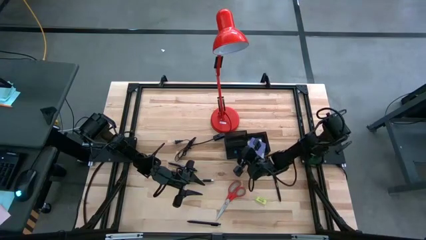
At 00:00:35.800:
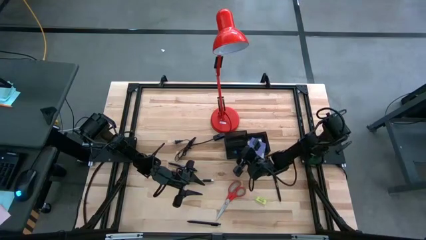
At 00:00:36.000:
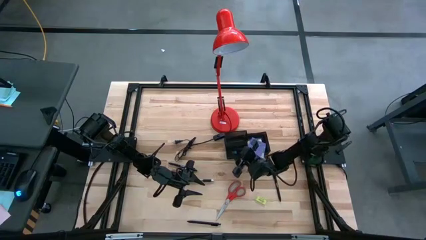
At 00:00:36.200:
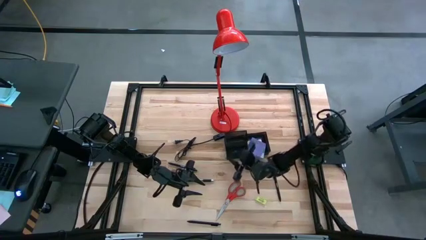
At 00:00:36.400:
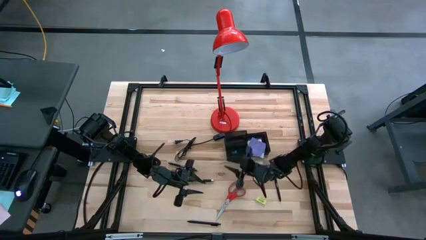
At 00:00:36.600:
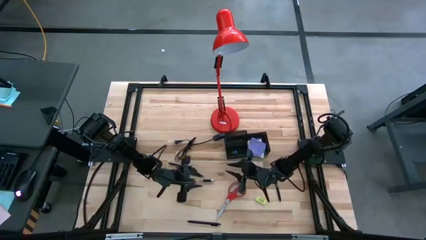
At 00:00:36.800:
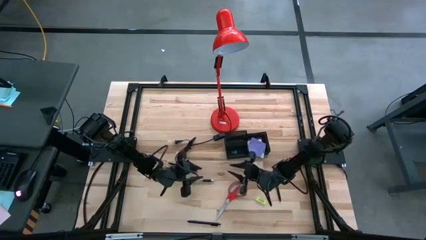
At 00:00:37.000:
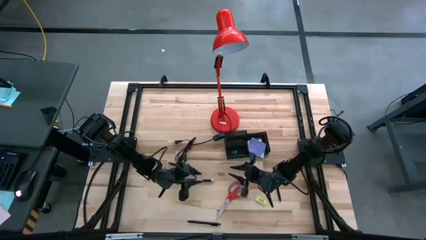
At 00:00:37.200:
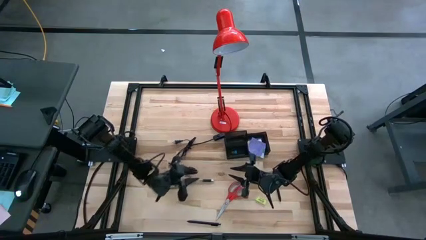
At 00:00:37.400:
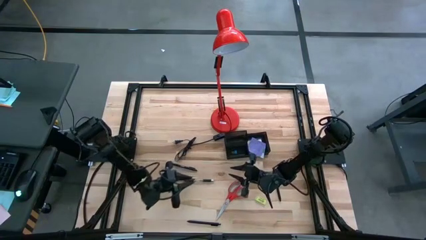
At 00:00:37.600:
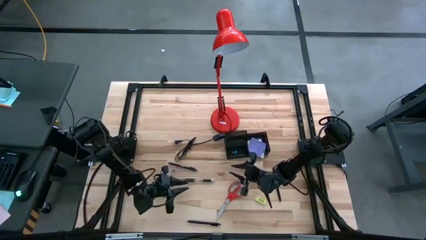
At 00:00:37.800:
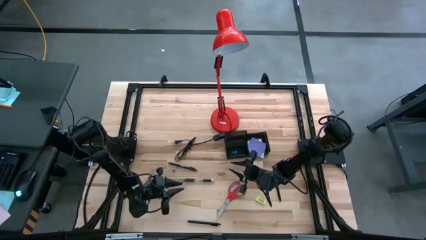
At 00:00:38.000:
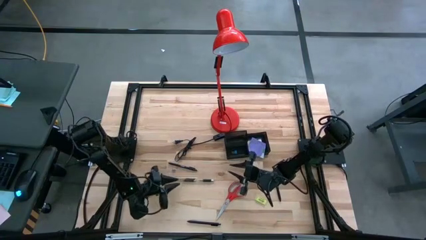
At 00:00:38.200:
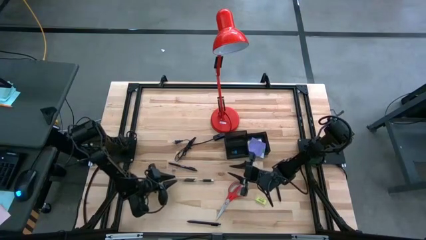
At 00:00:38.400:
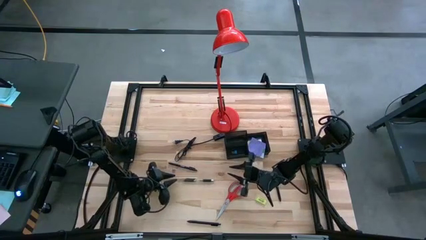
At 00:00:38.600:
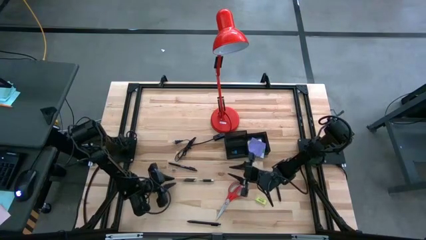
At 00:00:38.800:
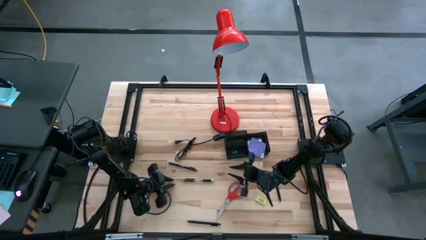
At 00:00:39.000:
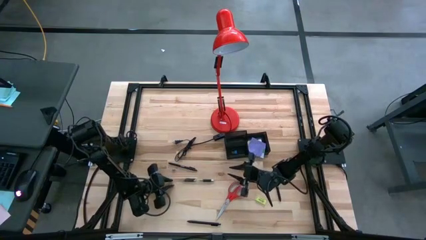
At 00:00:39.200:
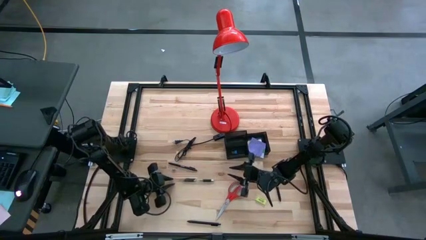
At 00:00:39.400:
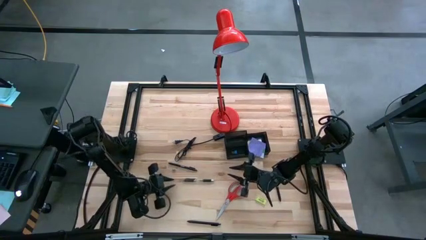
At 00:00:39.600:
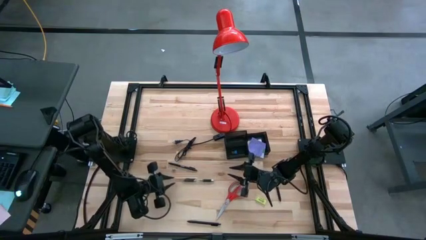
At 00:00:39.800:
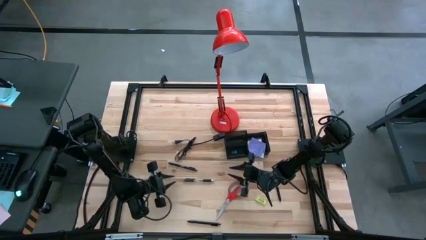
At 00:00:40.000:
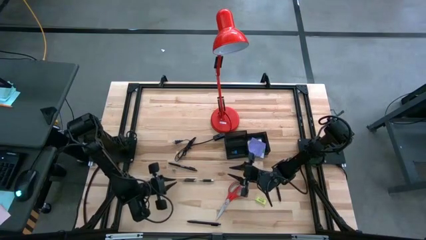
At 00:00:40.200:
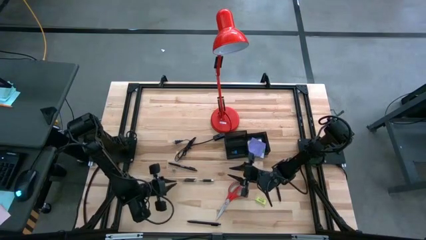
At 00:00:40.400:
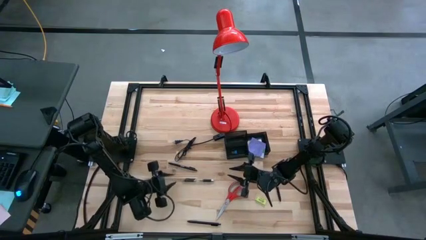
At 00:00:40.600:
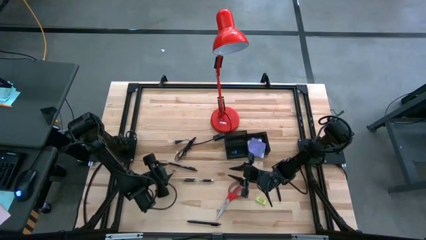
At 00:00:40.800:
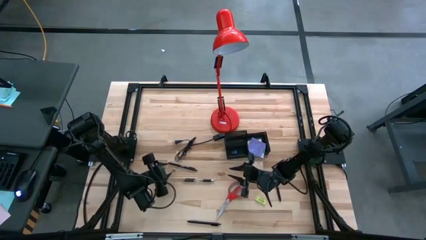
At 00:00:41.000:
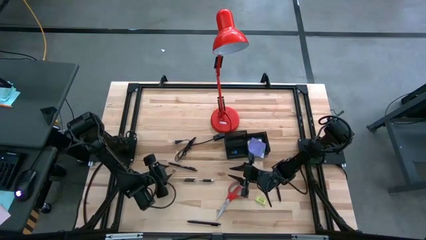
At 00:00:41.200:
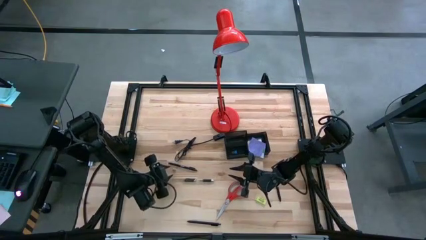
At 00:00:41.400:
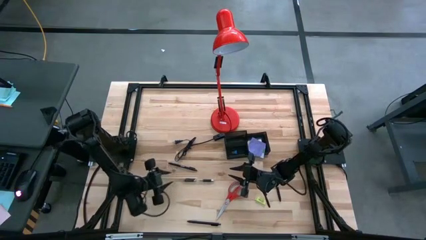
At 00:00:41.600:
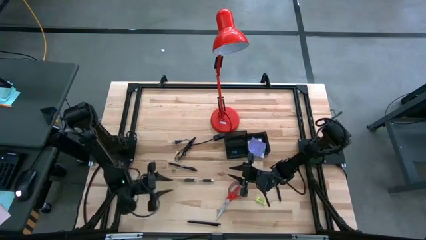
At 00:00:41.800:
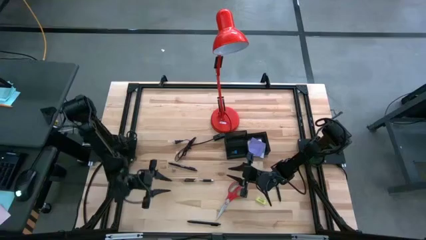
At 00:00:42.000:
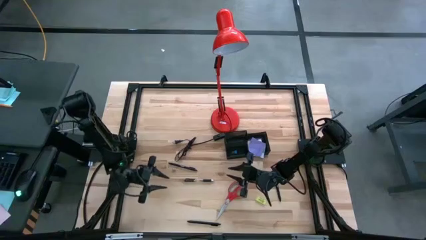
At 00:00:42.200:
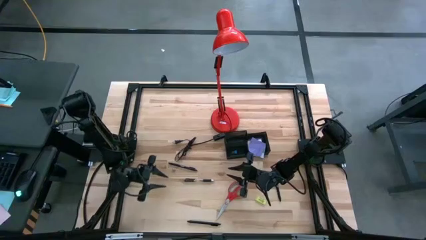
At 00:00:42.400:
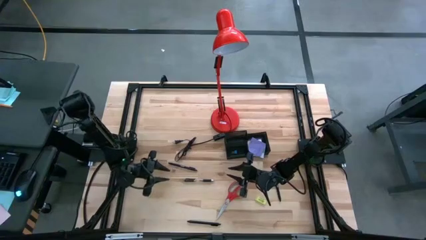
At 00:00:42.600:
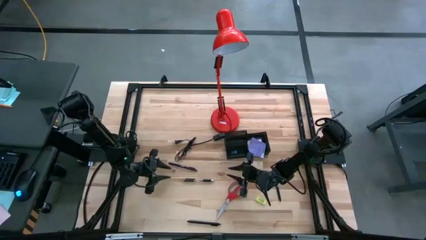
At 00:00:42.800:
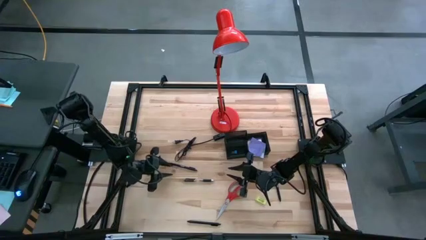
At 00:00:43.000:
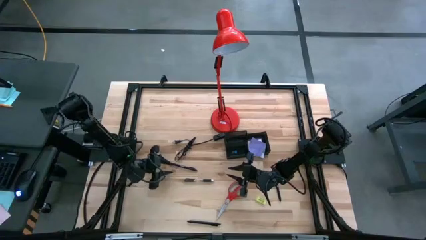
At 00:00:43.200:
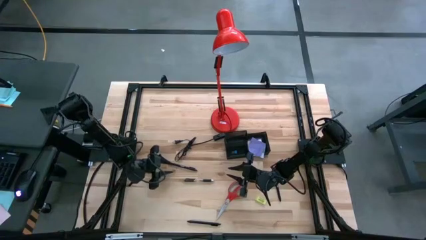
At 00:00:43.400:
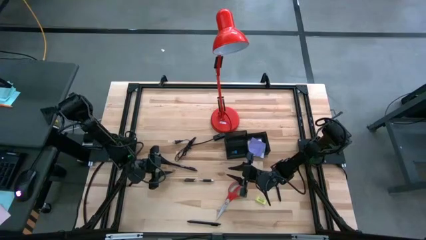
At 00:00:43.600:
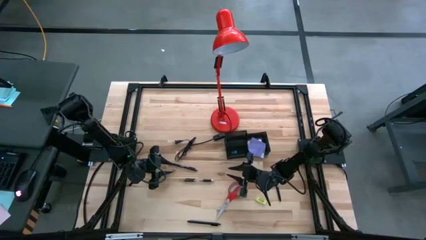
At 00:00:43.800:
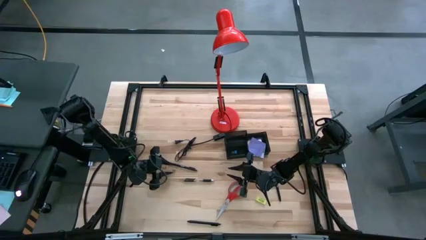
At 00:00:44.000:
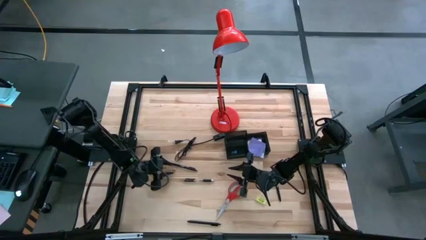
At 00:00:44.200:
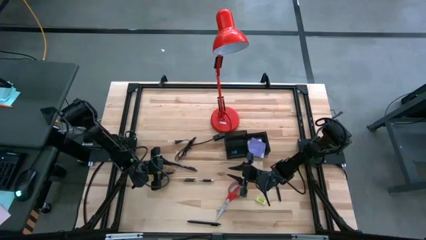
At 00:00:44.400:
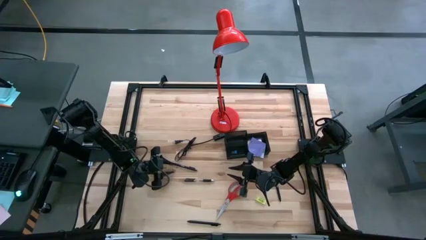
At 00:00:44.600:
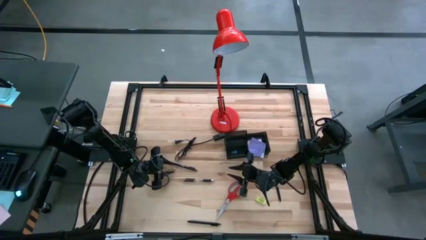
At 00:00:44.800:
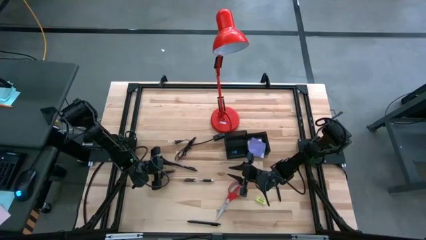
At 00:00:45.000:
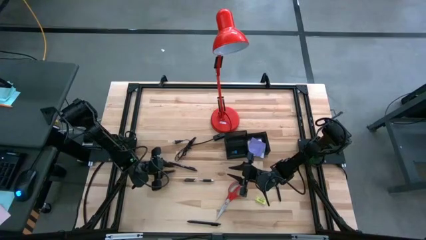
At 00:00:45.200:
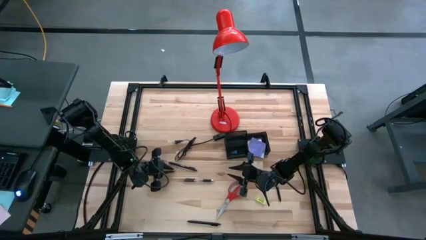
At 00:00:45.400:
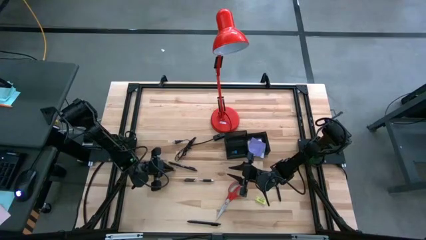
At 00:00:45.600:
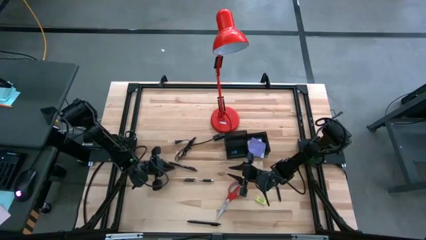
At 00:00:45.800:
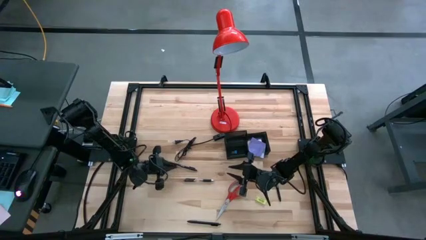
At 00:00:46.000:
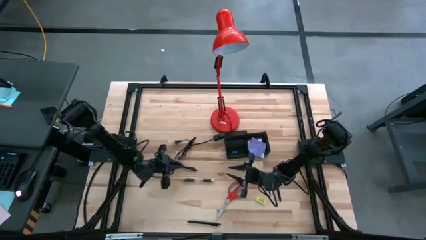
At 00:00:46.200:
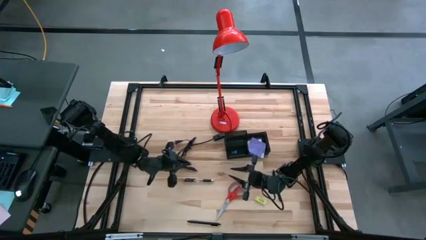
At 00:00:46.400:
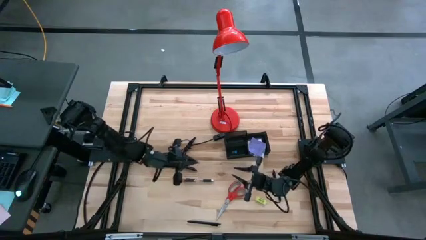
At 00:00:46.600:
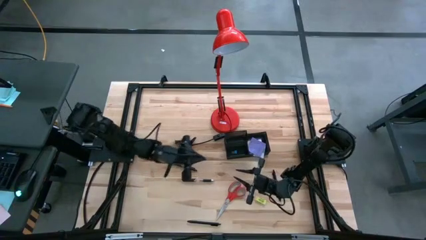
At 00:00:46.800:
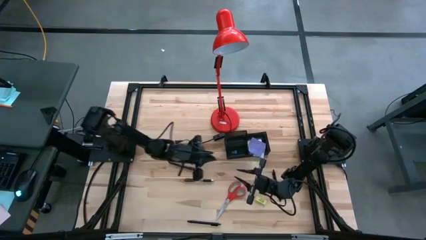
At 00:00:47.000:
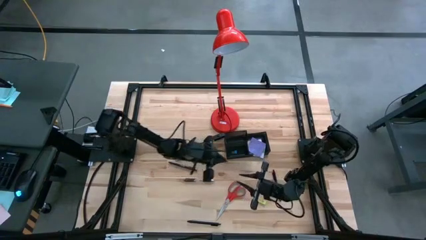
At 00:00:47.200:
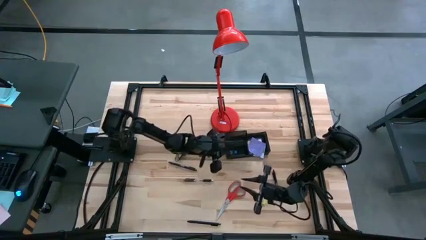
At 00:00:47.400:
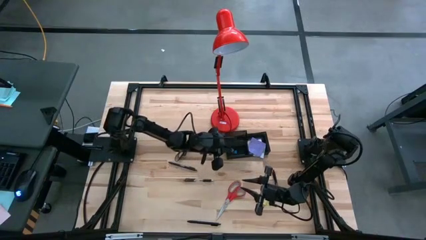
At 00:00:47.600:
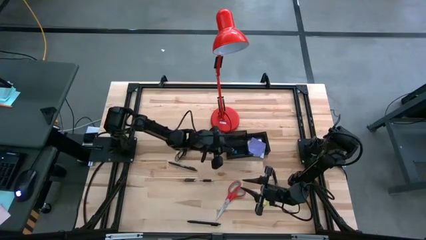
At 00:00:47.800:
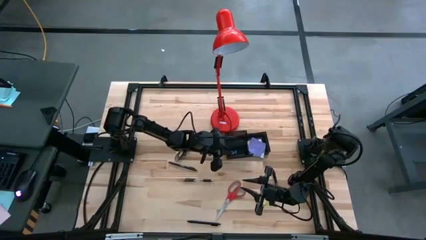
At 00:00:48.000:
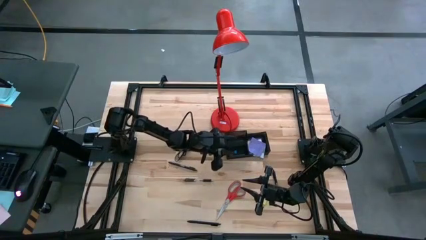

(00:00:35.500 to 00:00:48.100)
Task: Pick and place office supplies into organizer
Put the red binder clip into the desk organizer
